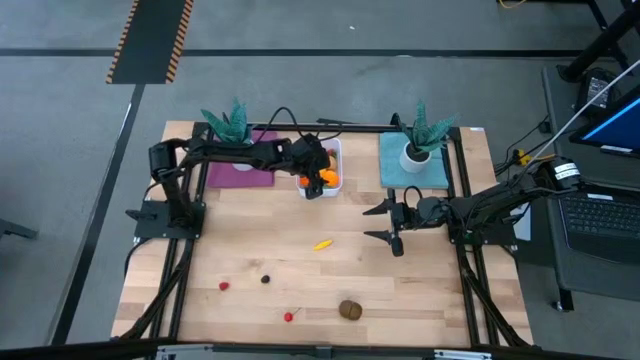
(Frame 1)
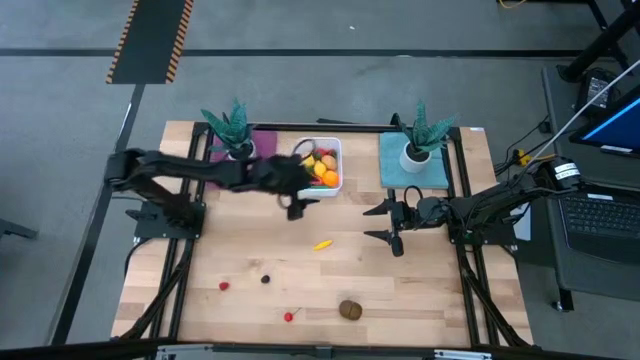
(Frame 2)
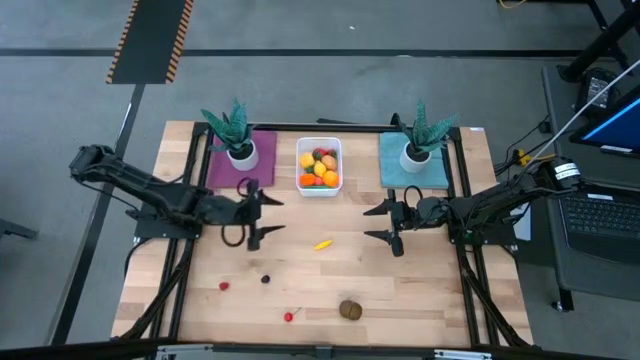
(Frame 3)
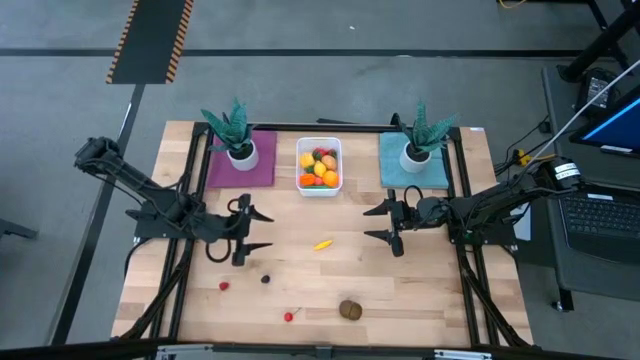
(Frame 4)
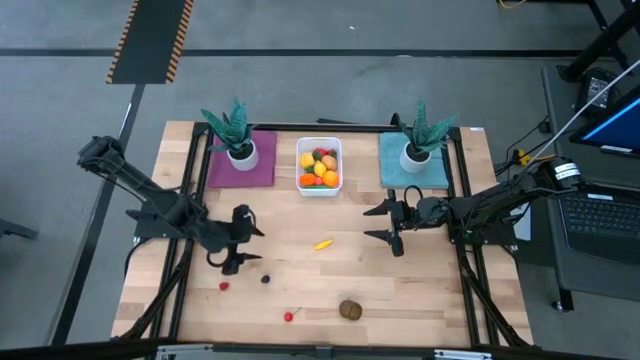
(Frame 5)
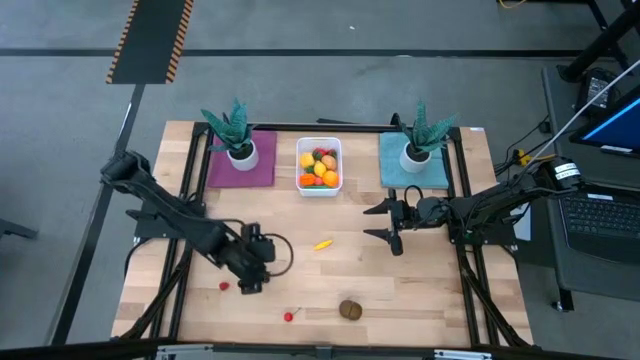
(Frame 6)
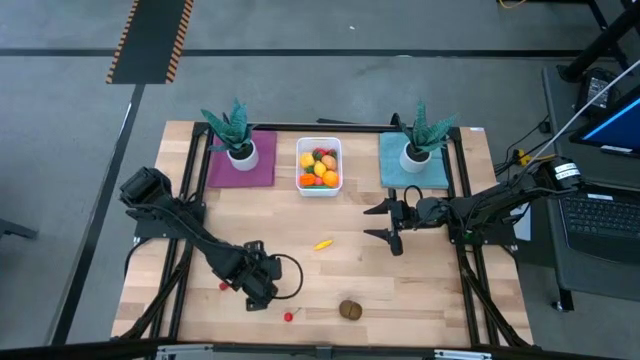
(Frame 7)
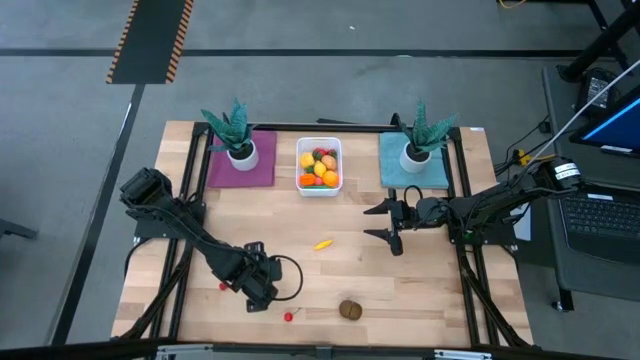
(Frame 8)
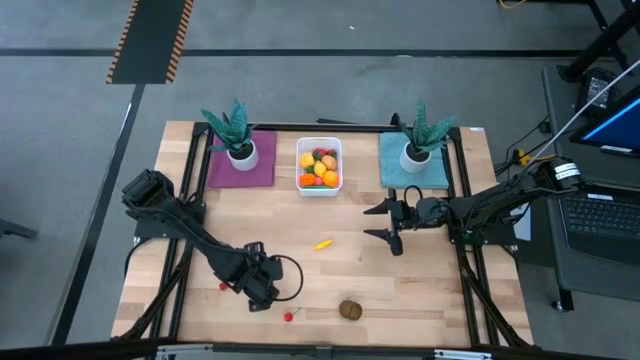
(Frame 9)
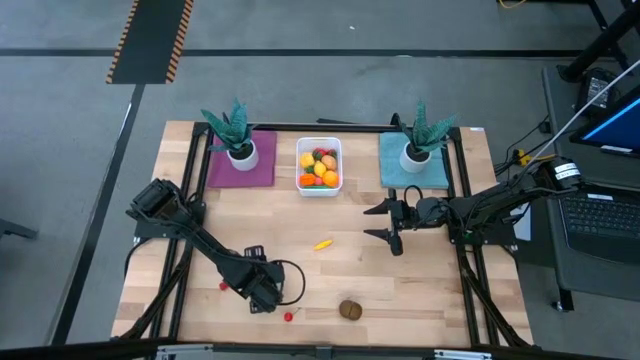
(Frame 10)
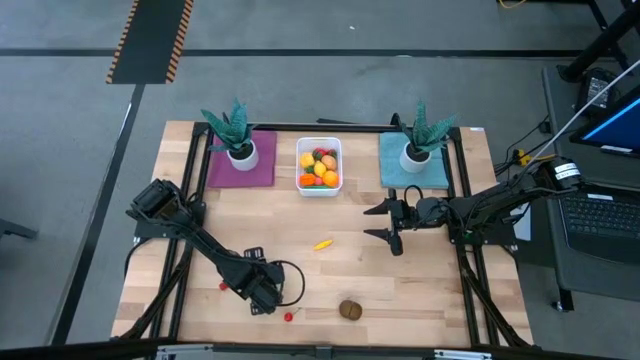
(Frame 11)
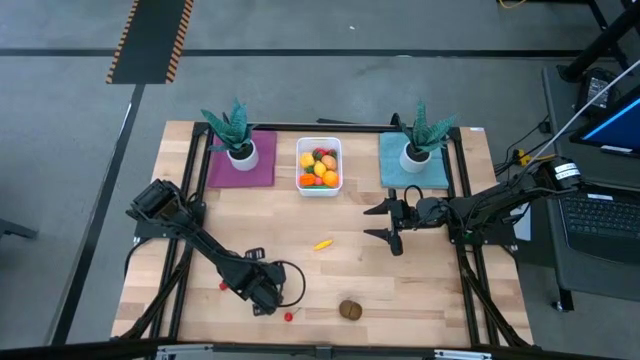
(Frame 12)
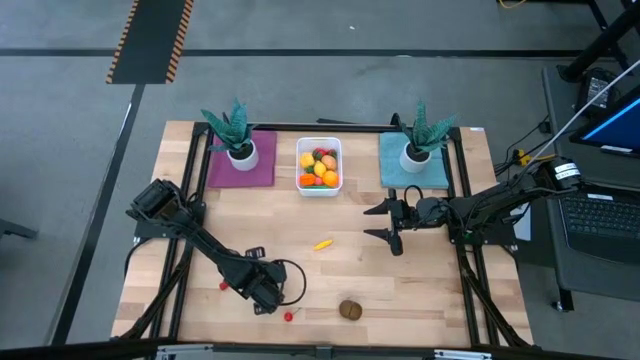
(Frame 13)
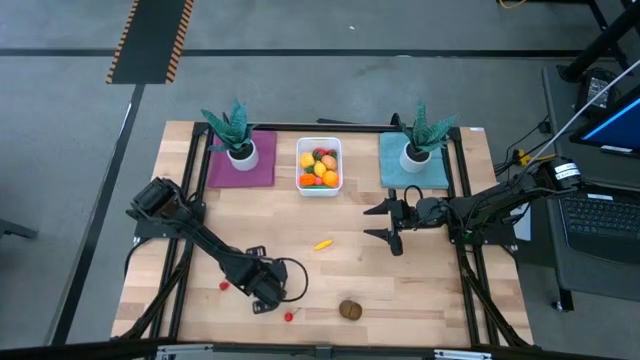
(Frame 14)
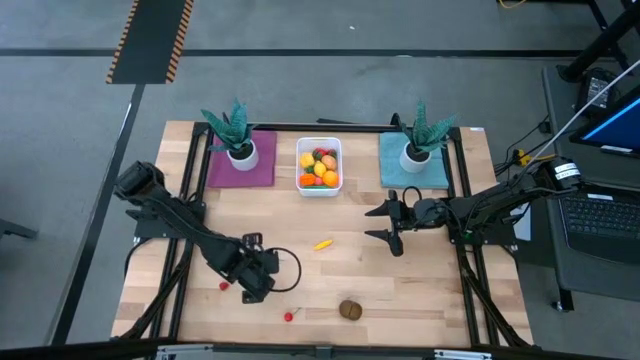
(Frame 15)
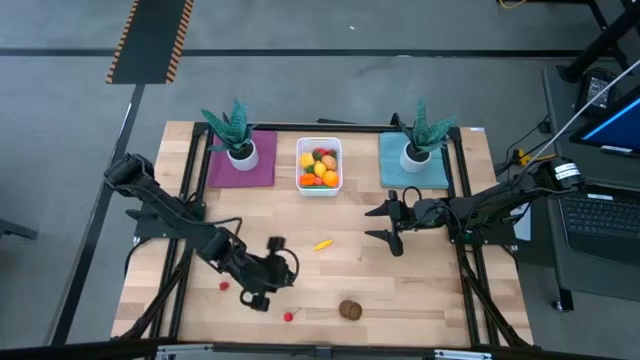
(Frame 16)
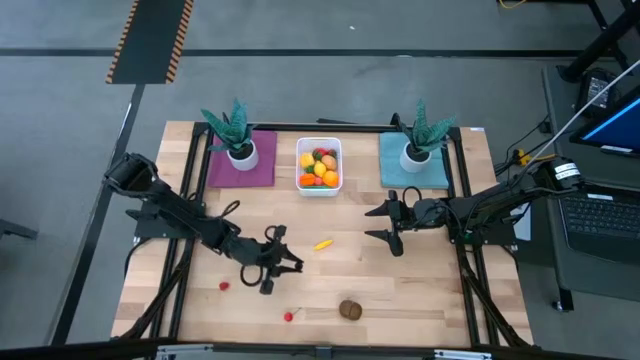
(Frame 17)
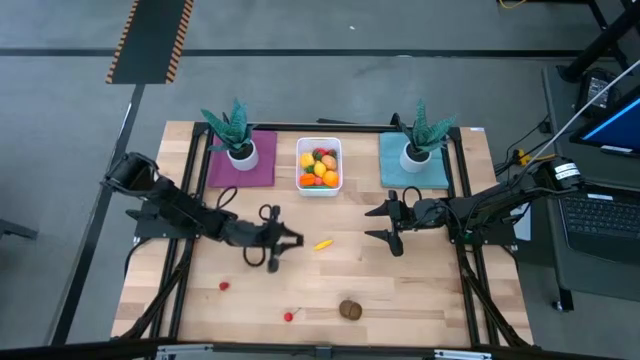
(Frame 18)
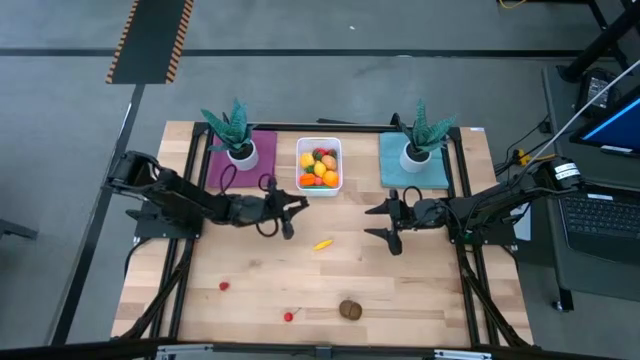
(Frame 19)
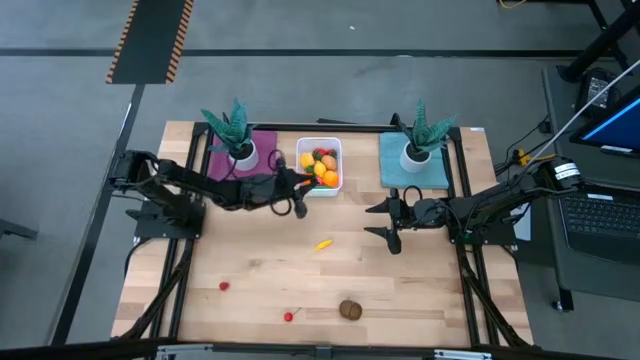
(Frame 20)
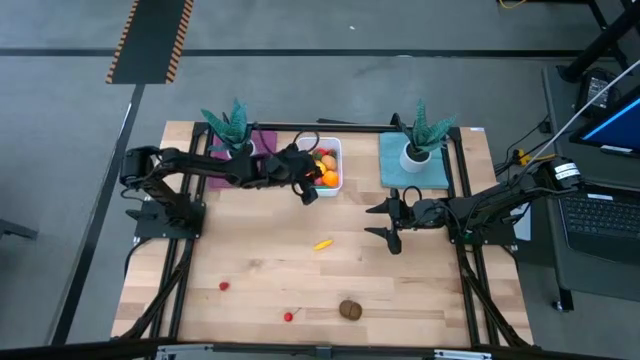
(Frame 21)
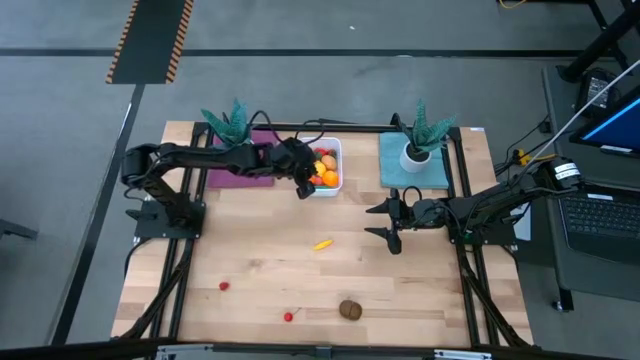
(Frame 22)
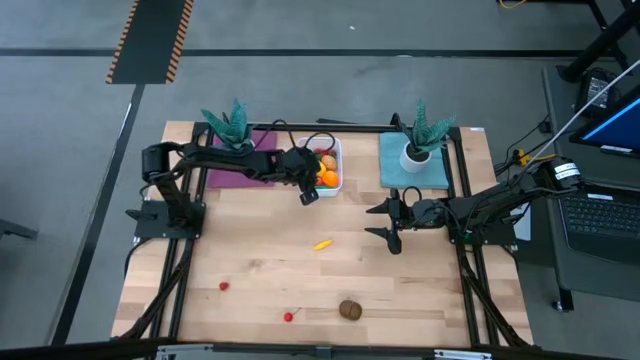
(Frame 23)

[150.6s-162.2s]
Task: Pick and placing Produce into tupperware
Put the black raspberry into the white bin

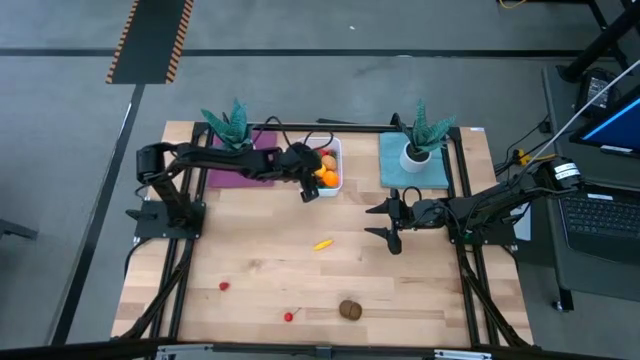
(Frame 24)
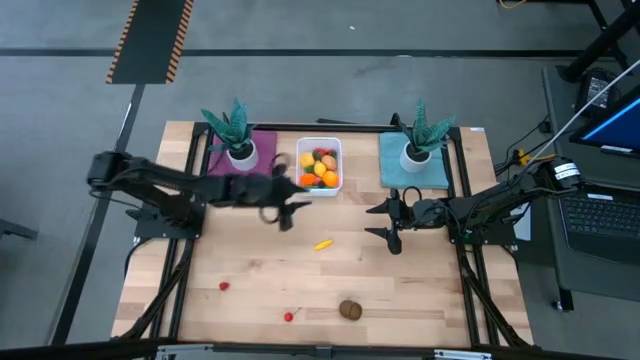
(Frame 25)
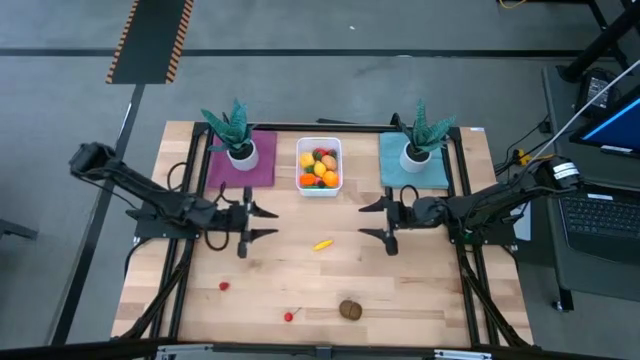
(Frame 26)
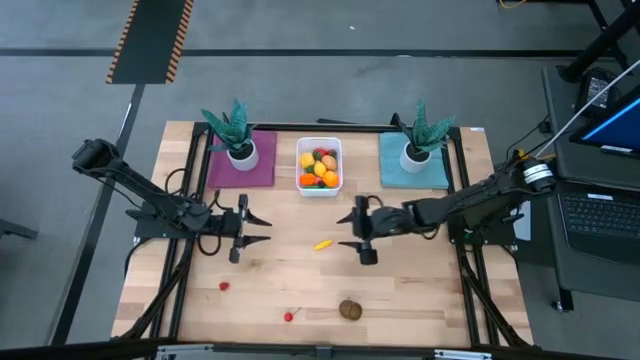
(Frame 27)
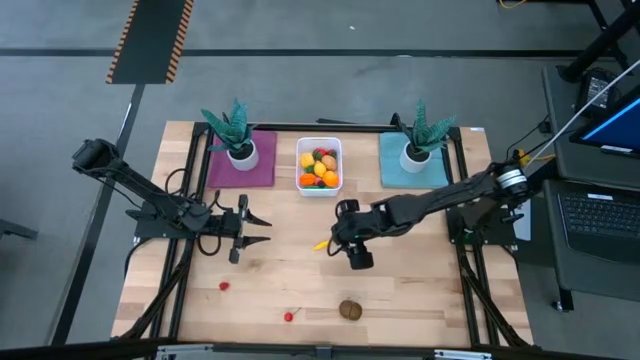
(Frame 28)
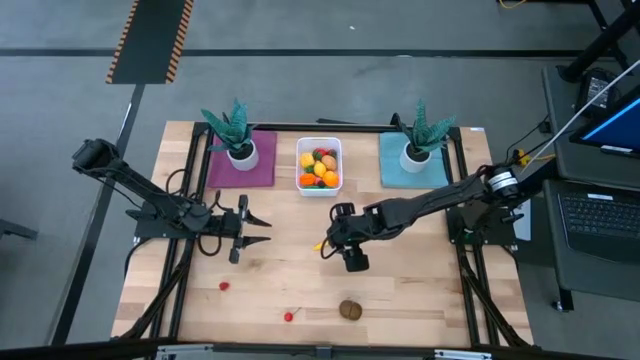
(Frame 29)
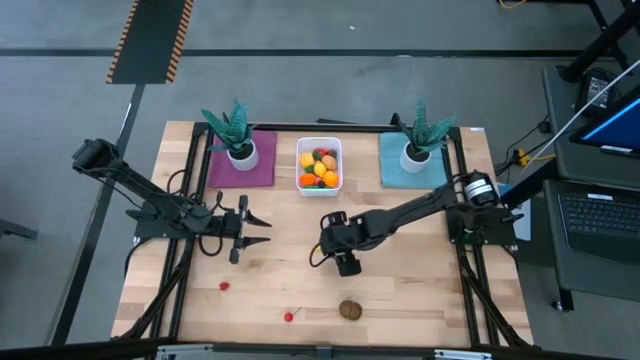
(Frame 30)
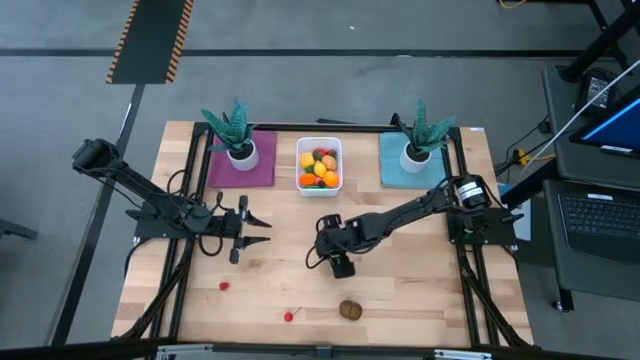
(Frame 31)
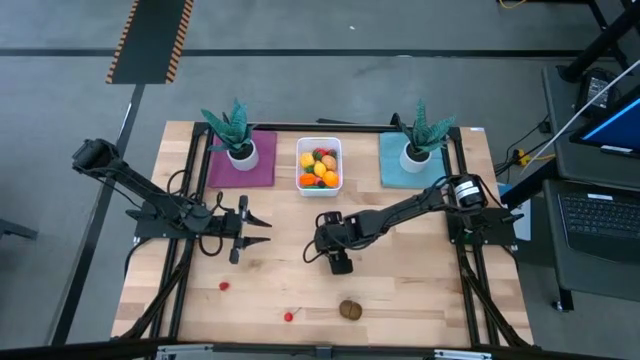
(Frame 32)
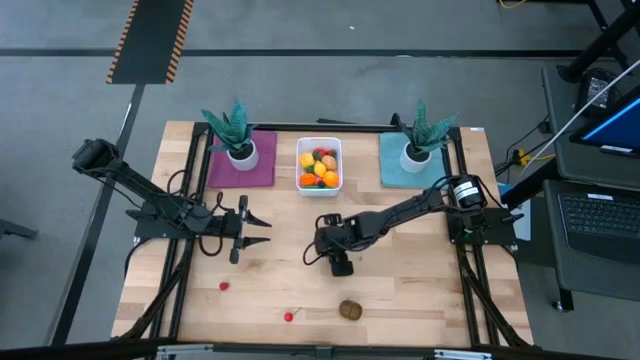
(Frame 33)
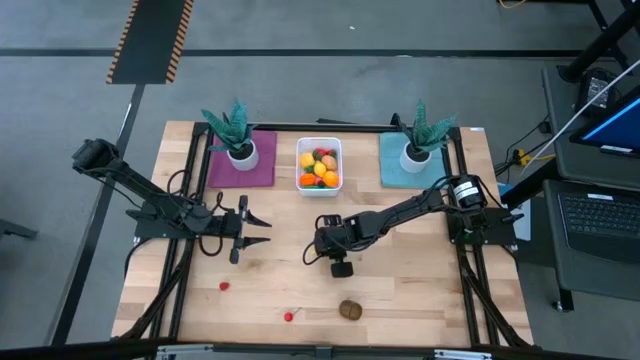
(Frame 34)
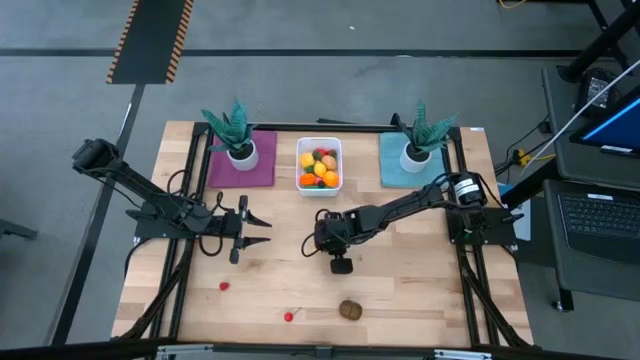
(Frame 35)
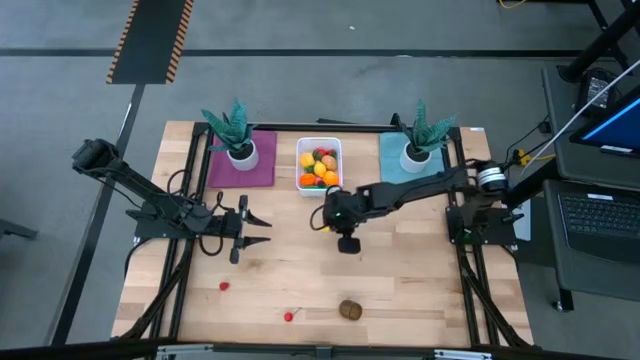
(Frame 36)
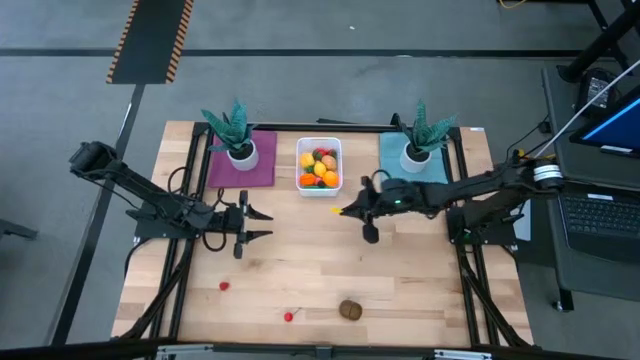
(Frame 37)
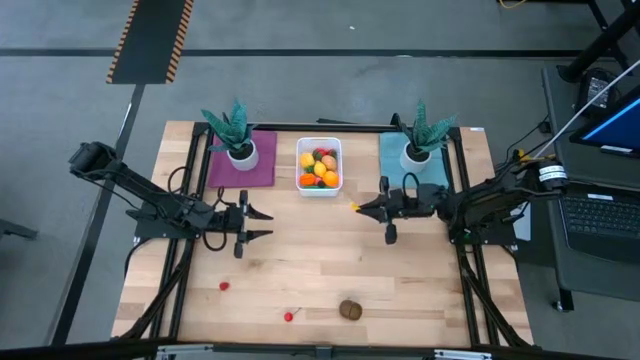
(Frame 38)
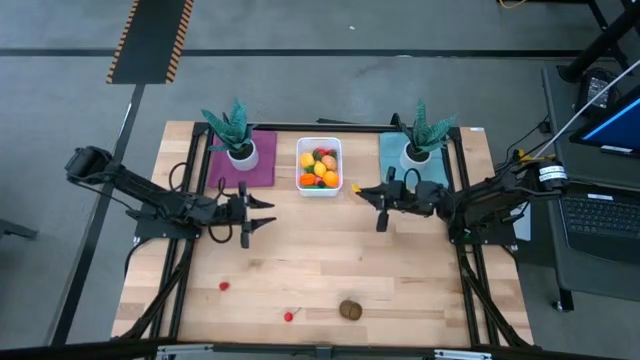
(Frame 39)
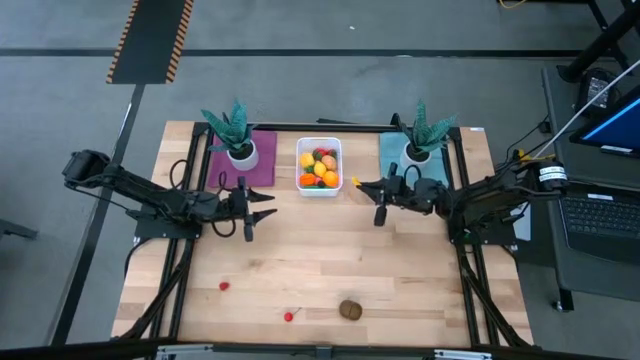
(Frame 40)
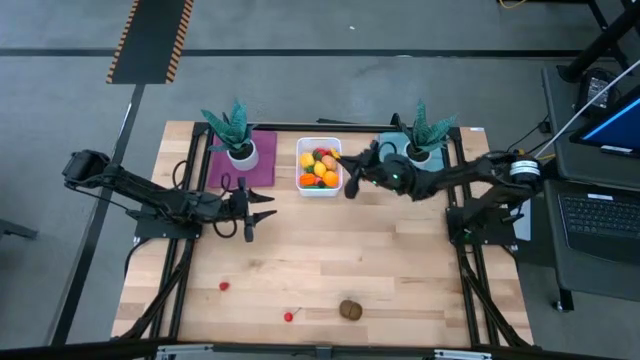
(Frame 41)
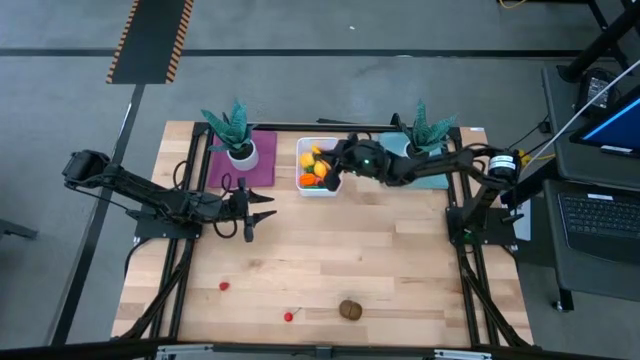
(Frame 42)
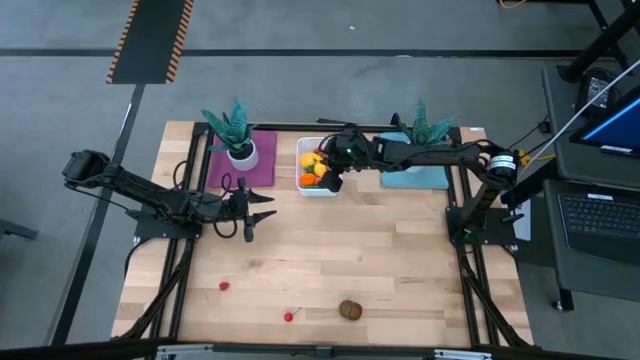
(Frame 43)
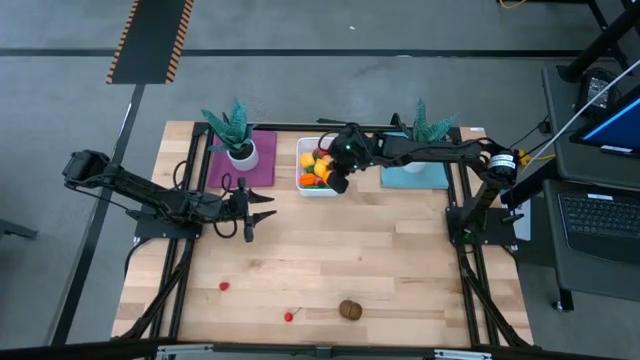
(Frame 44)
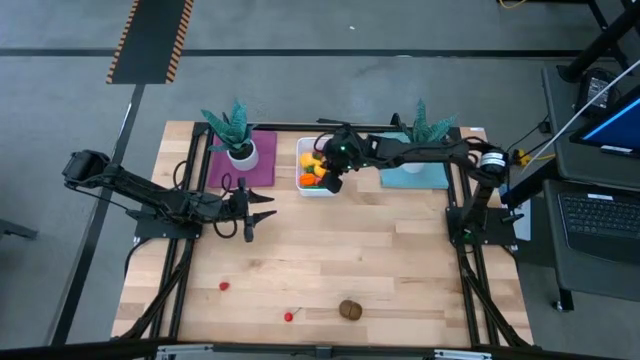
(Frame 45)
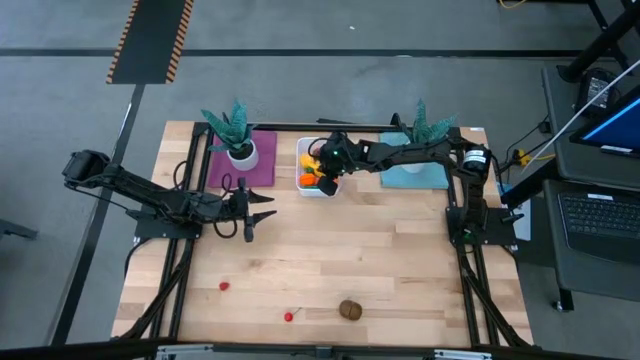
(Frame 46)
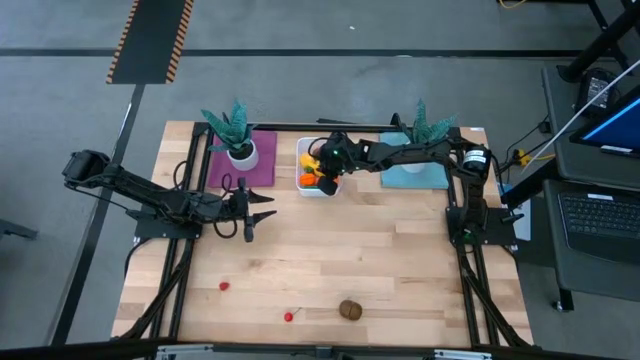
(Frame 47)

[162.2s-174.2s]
Put the yellow zucchini into the white bin
